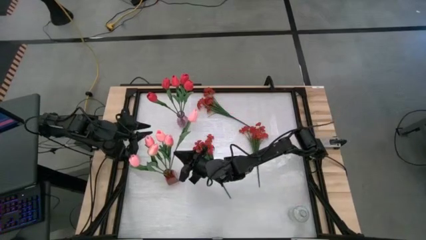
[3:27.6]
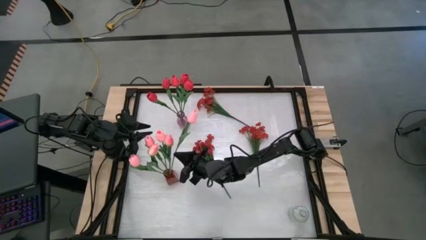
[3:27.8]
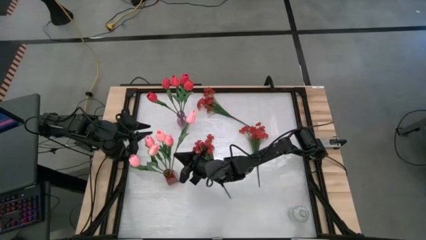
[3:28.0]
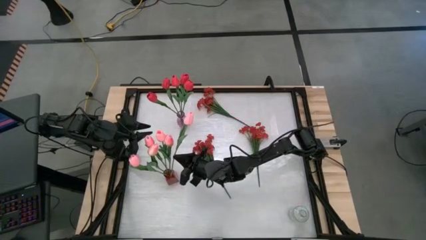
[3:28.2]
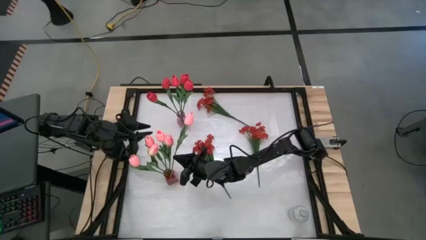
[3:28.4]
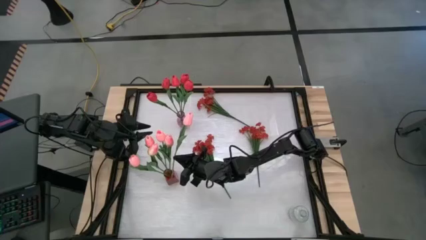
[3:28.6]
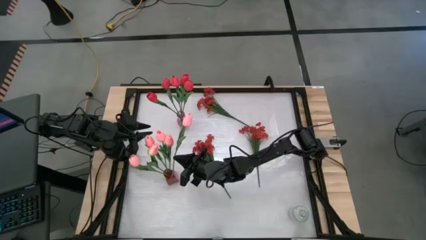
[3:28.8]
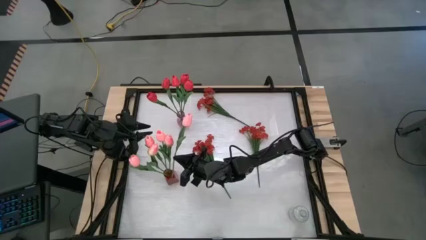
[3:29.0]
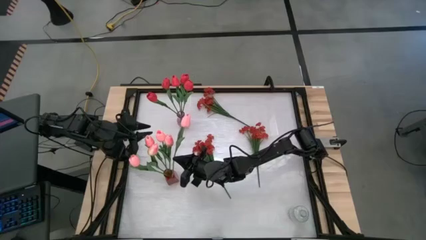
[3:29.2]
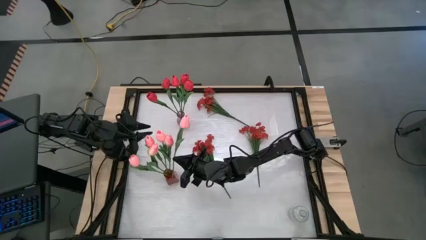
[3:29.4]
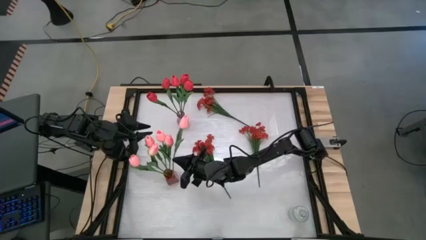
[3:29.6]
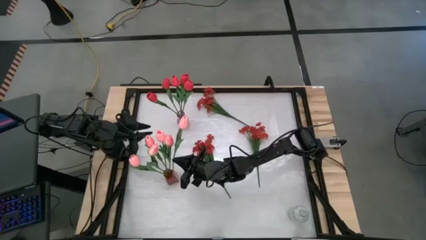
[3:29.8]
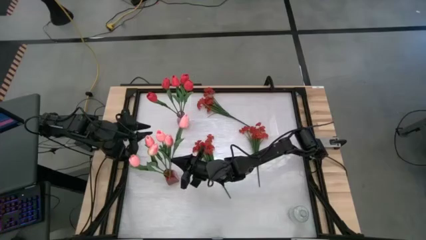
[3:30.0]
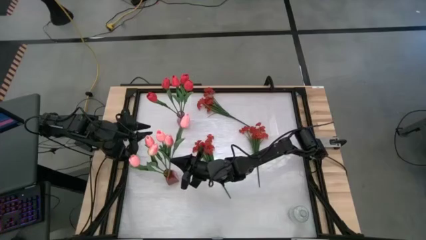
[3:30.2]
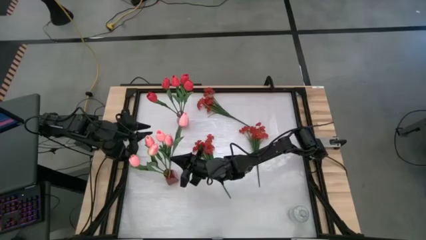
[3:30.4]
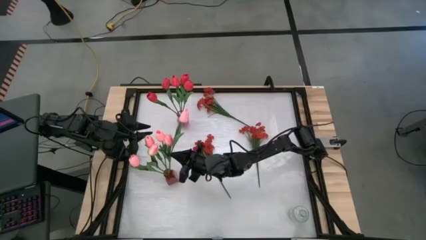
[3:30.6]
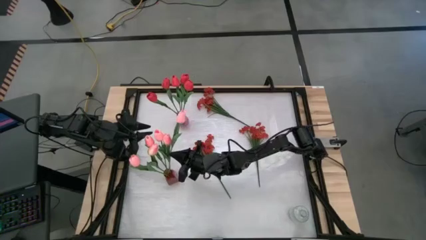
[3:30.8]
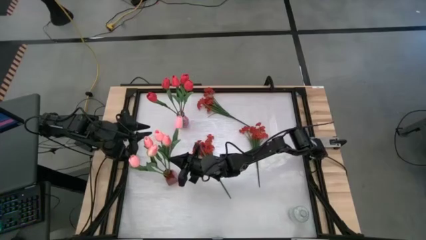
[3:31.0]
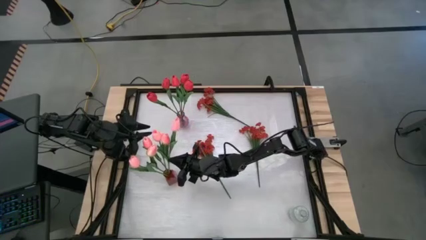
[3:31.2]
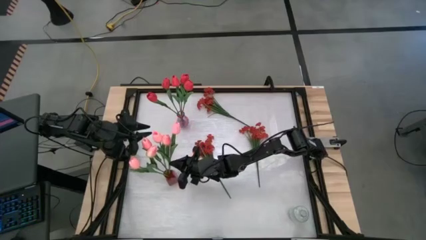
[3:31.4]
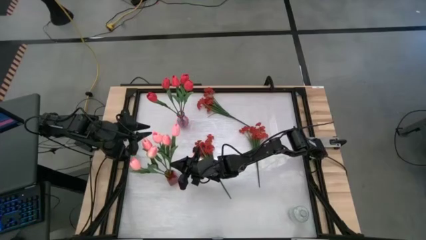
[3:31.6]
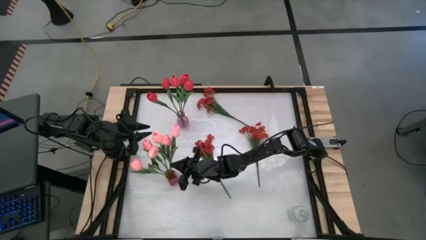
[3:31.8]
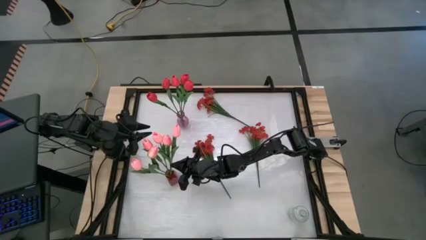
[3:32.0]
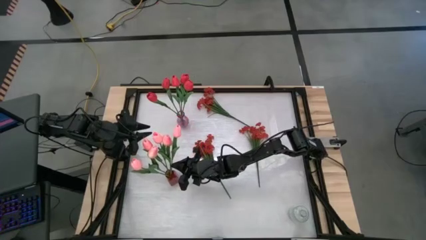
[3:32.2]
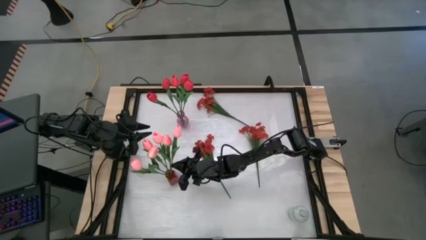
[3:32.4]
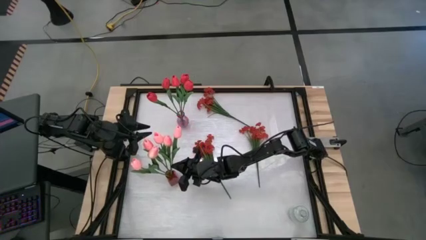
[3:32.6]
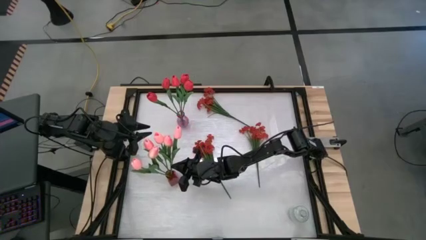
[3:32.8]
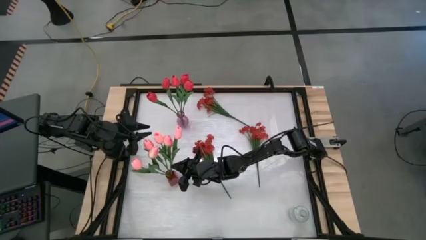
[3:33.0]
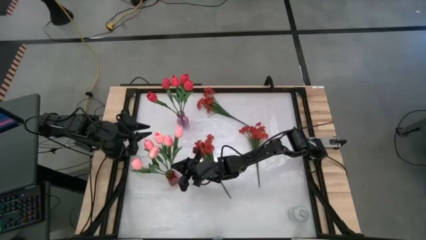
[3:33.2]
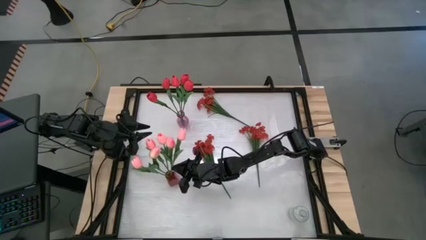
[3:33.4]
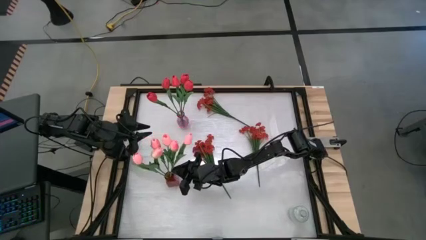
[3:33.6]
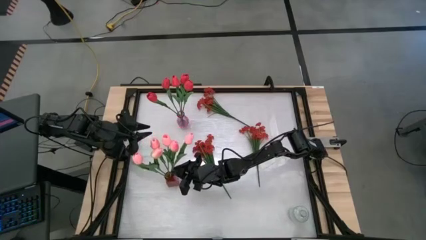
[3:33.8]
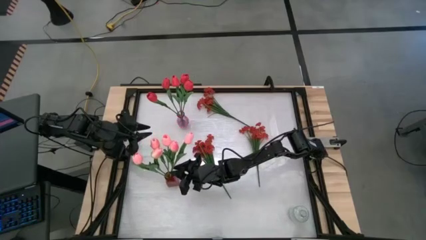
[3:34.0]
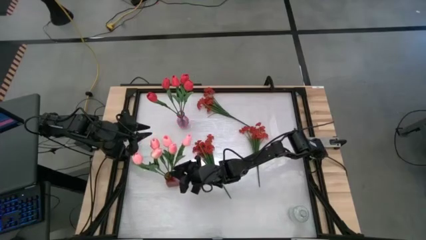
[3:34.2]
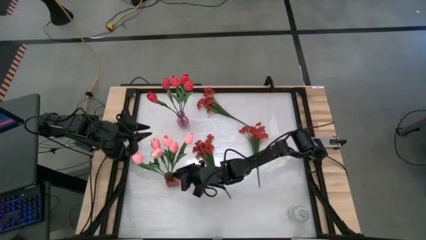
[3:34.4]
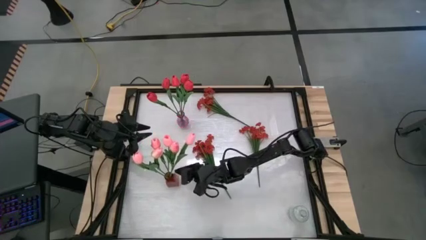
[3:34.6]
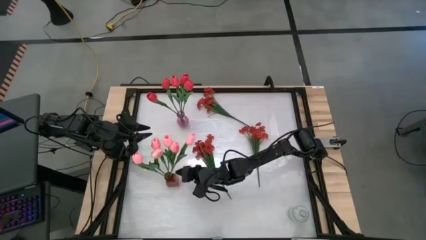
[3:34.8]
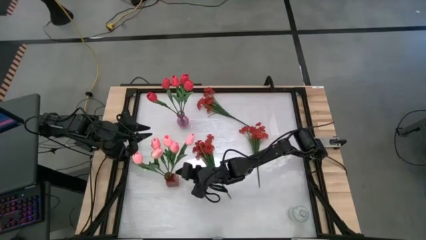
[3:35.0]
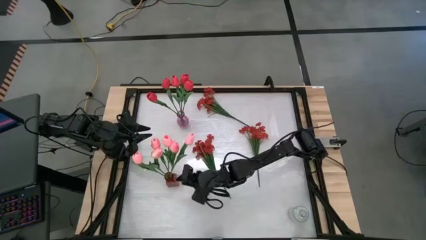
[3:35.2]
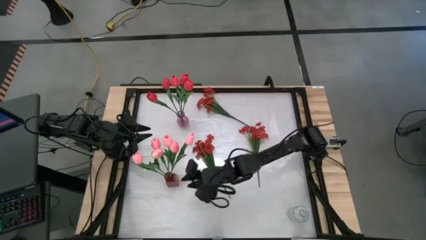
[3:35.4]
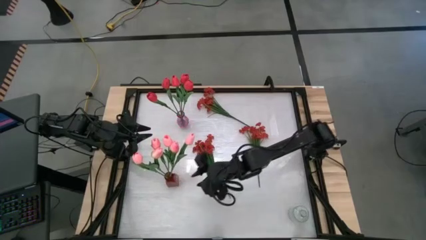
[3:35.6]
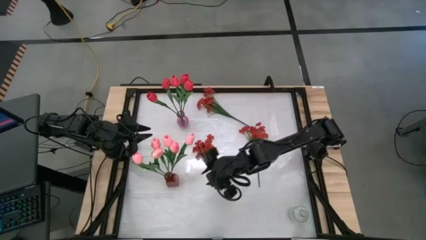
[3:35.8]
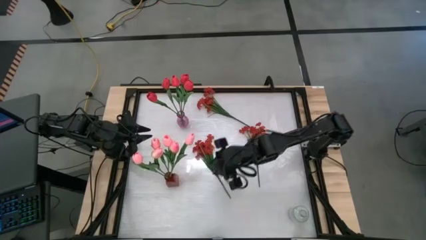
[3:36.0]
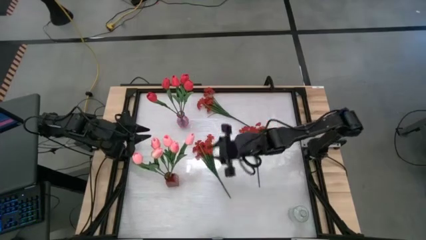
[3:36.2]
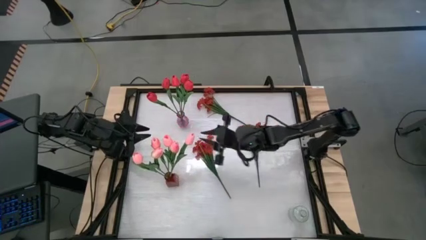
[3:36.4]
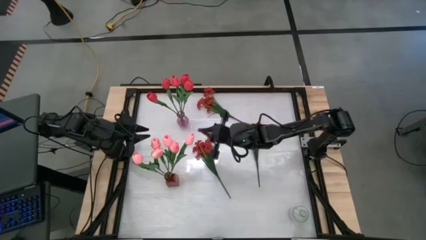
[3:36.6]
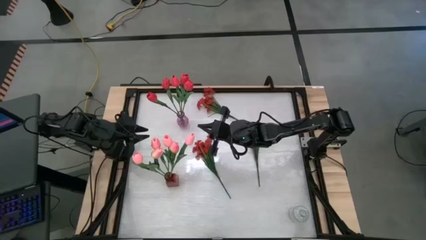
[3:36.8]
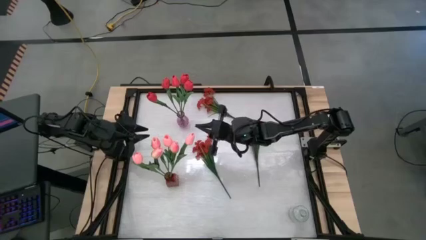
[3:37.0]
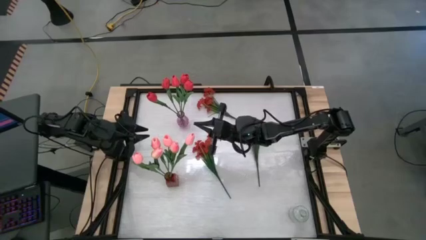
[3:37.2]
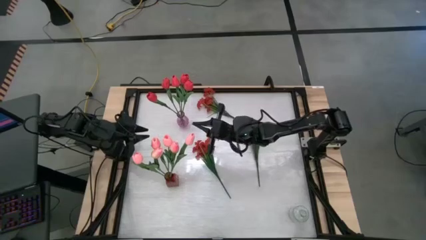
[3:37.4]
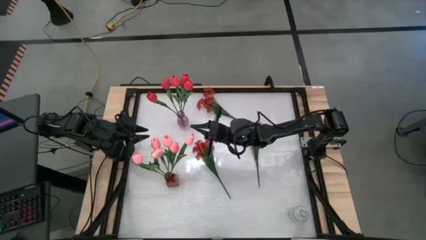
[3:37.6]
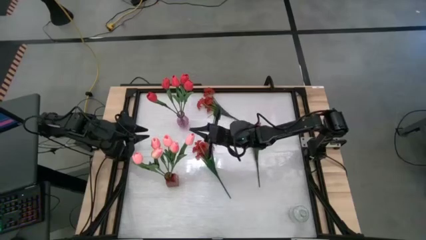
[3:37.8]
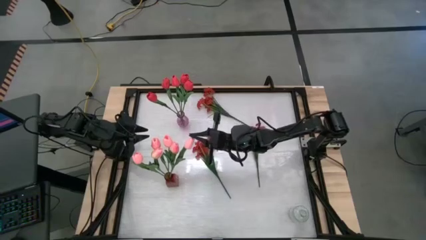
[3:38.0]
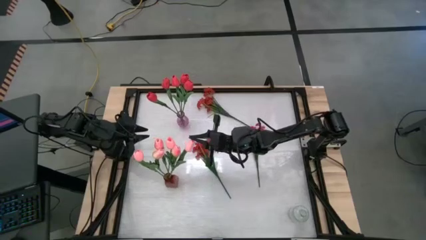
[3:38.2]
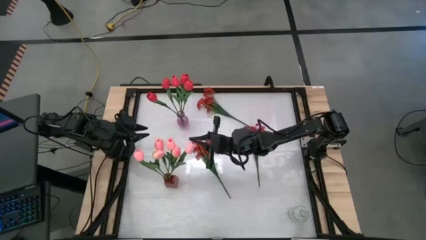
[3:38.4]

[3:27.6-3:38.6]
Task: Sort flowers into vase by color
Put the pink tulip into the red vase

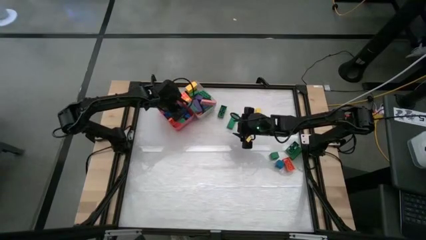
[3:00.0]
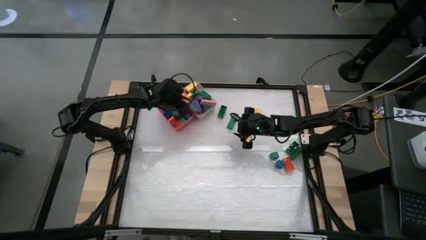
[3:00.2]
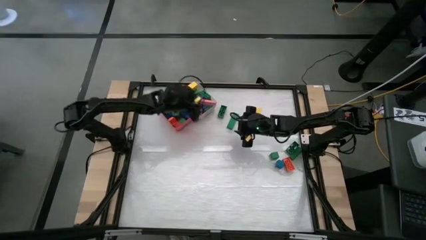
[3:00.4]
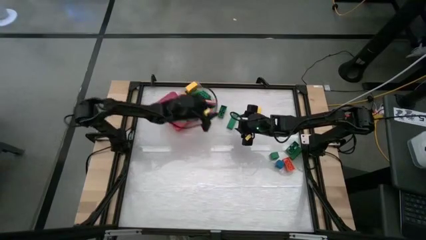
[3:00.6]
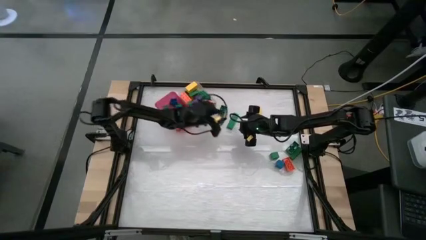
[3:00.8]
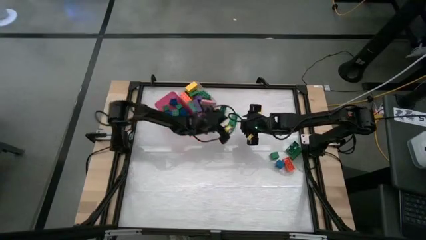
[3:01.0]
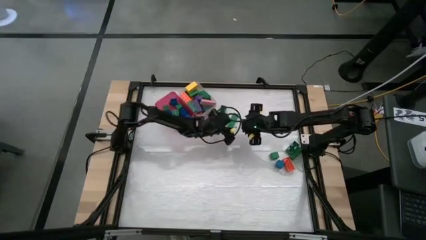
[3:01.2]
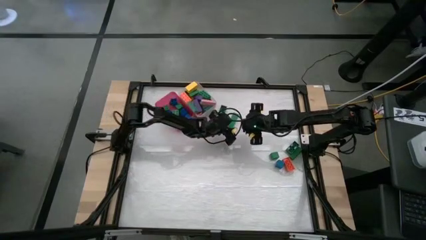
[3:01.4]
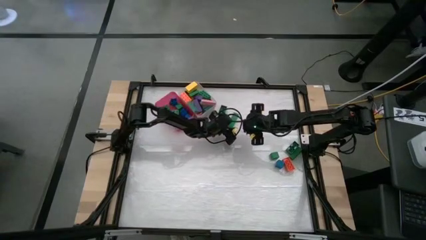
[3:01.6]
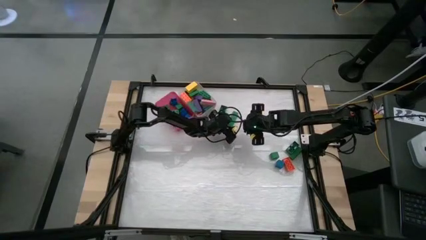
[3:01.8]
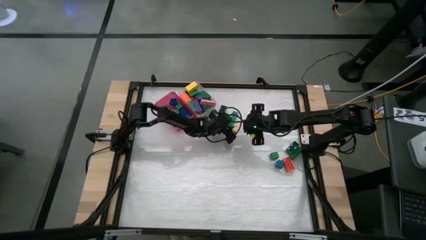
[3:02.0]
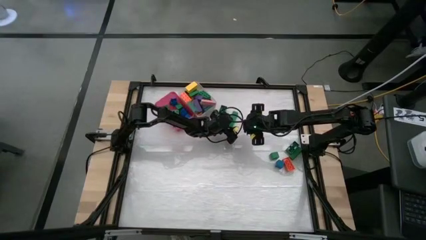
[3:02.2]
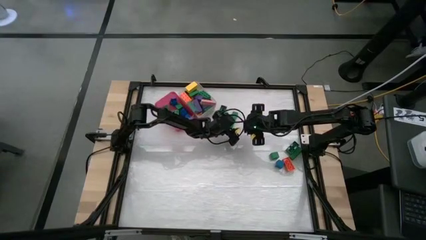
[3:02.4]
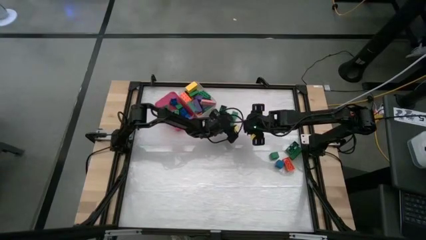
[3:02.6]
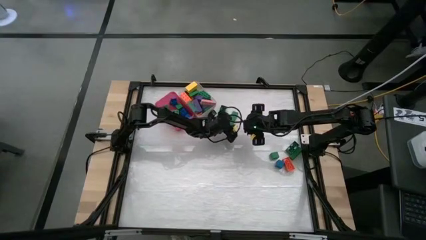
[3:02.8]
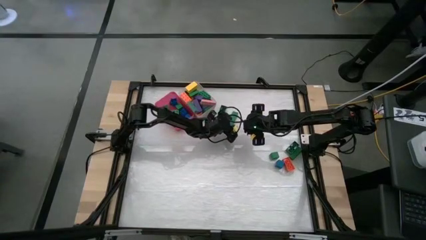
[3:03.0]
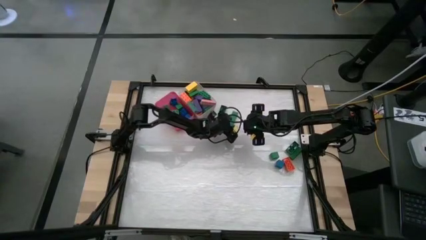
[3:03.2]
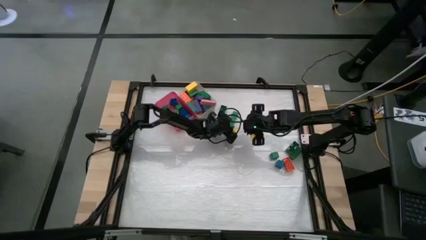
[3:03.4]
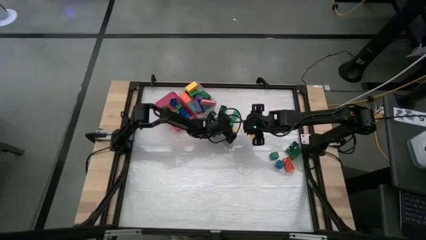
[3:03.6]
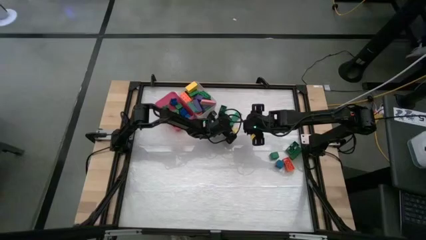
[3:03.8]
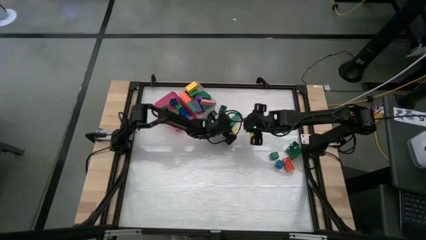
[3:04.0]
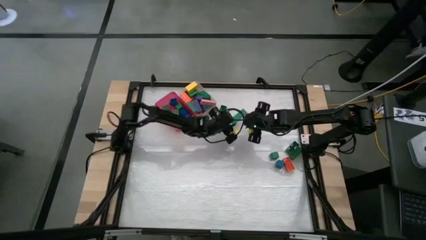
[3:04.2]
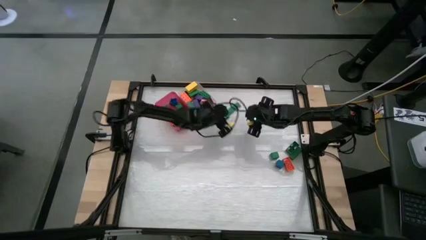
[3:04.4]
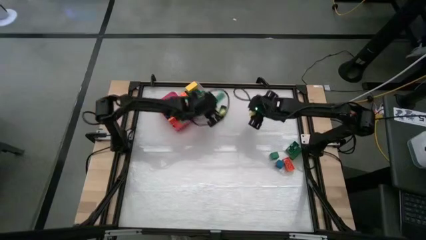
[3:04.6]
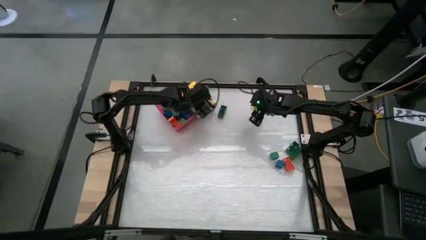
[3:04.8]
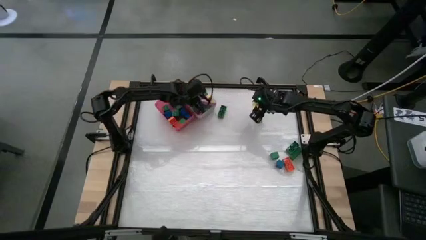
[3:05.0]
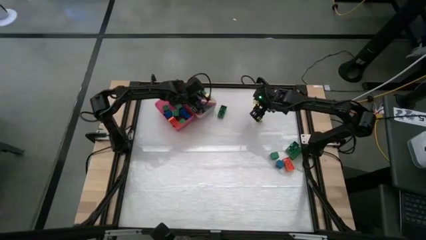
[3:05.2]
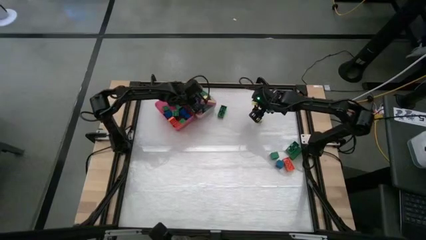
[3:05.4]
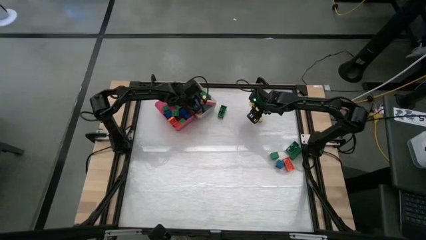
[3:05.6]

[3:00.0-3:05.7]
Task: Sort blocks by size
Put the big green block into the white bin
